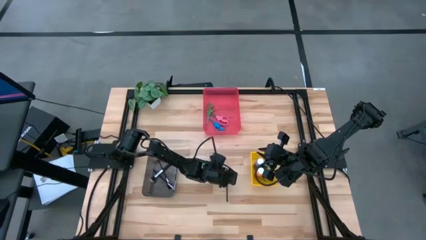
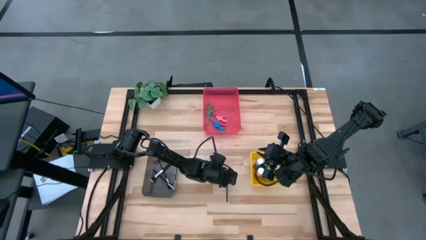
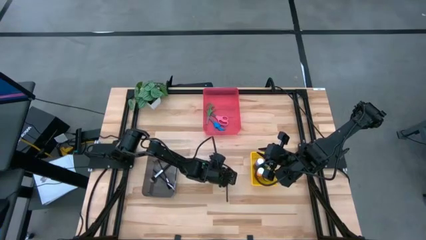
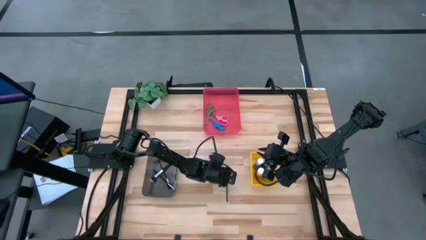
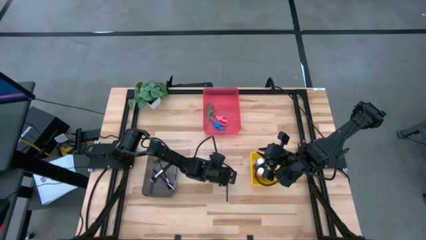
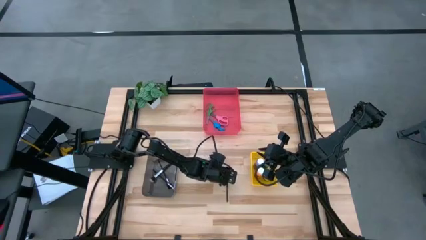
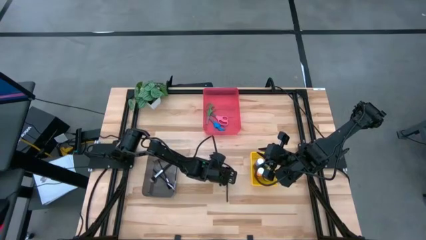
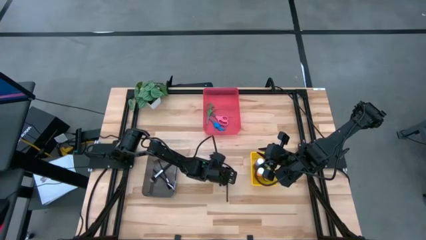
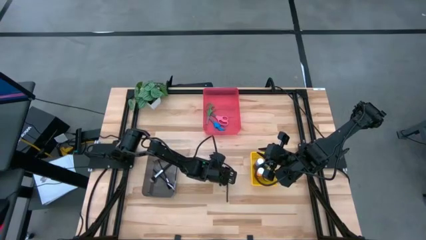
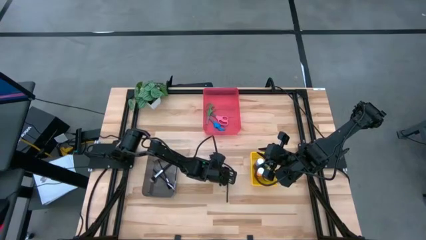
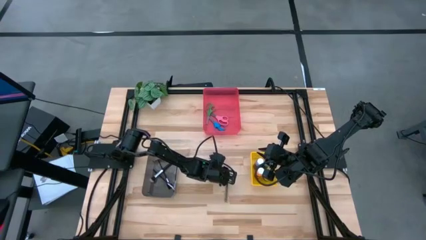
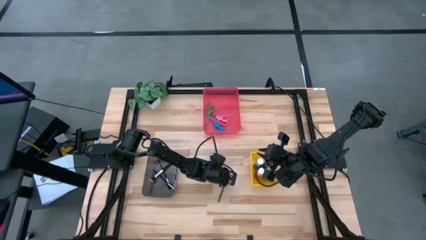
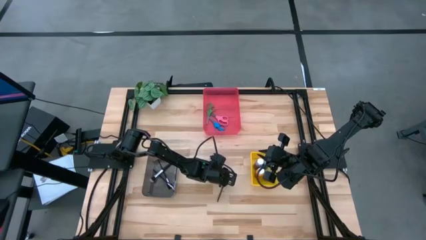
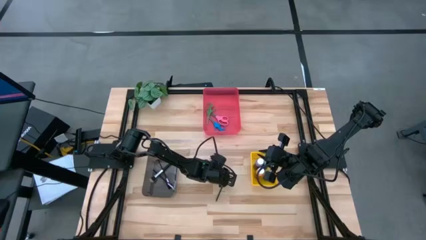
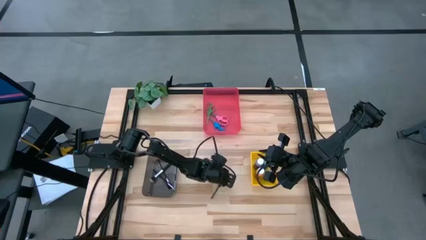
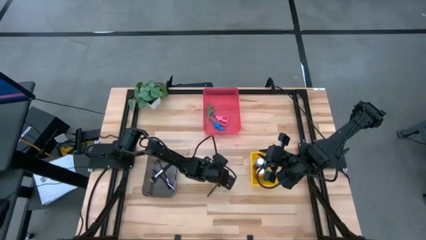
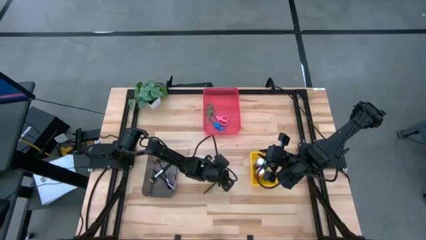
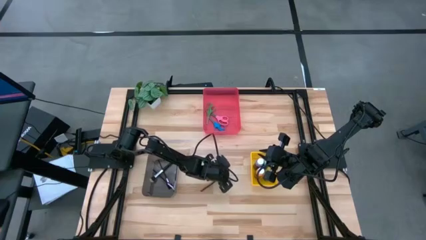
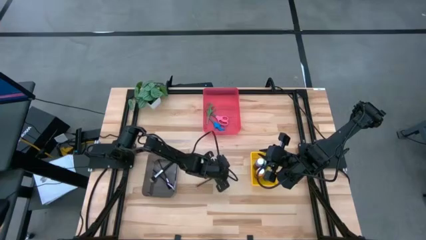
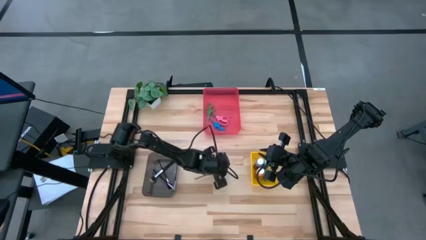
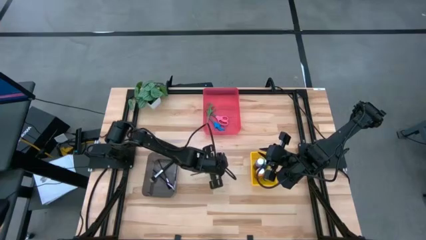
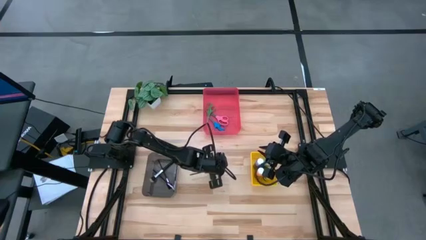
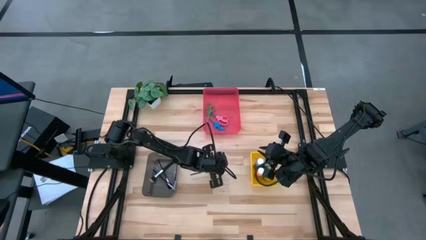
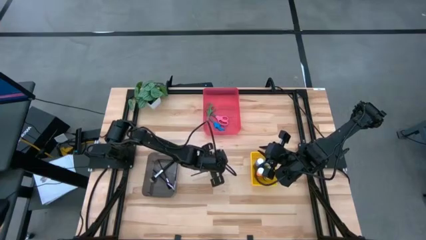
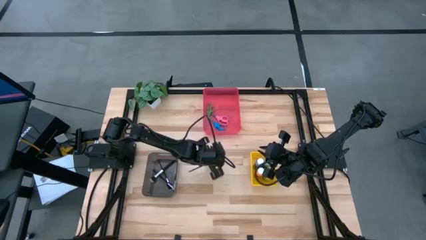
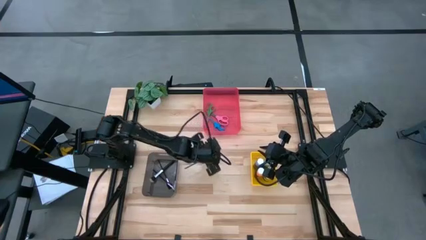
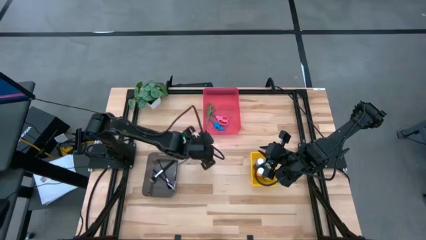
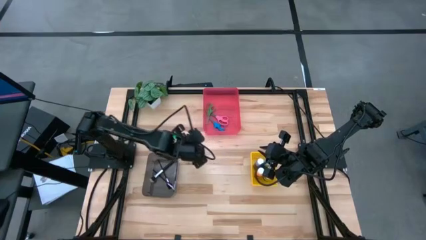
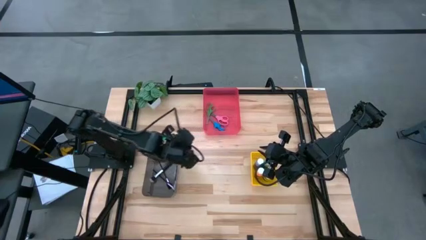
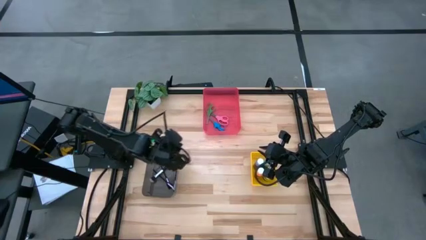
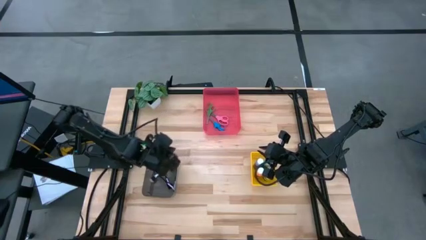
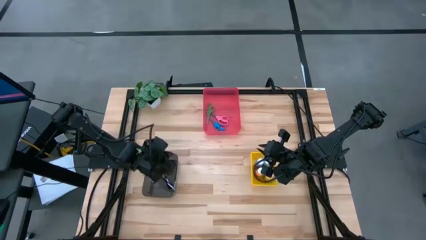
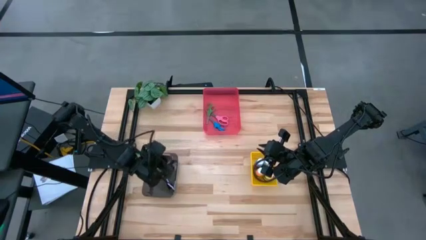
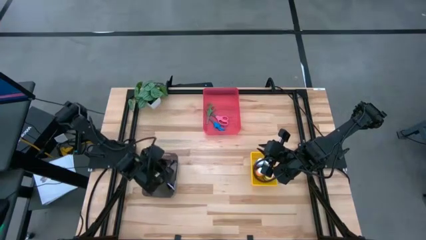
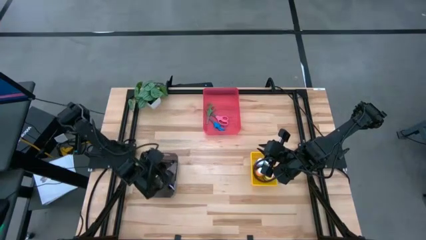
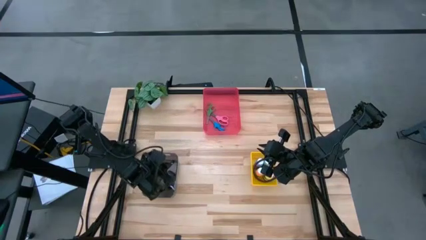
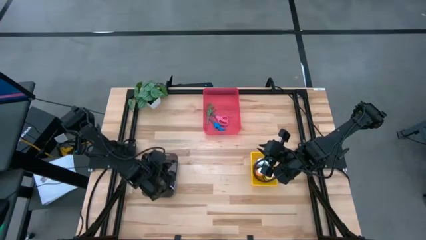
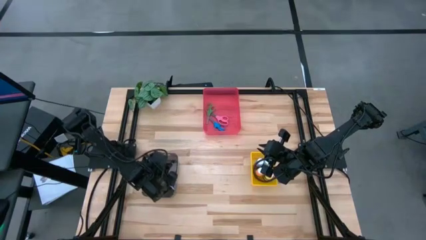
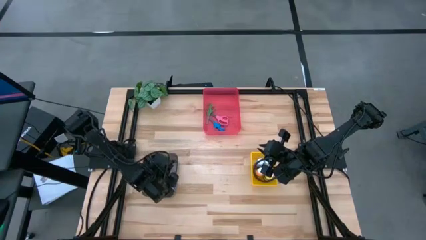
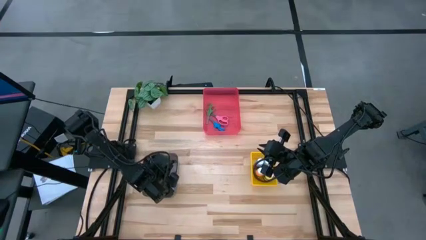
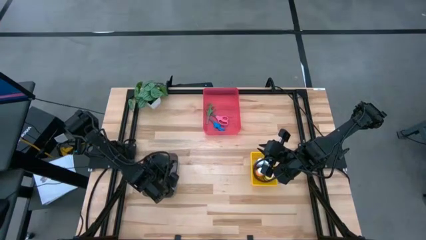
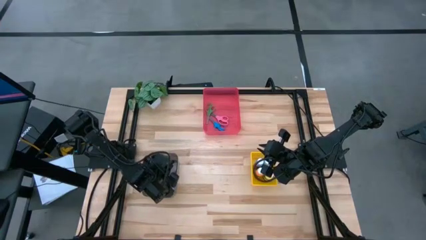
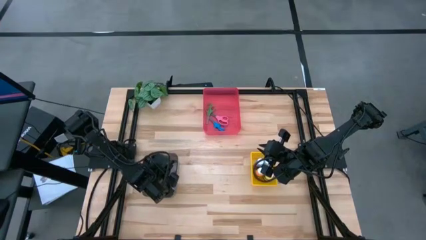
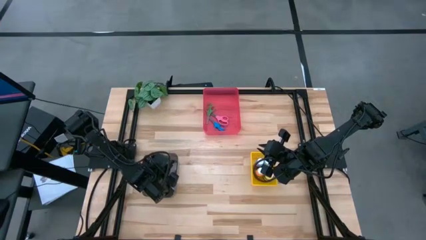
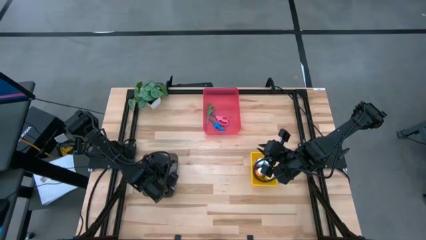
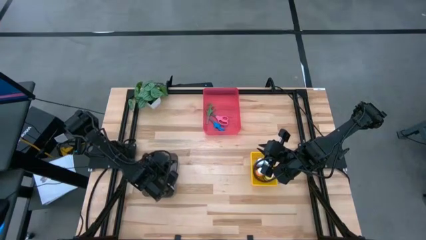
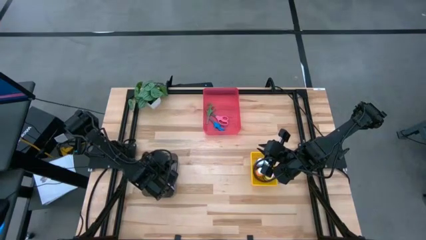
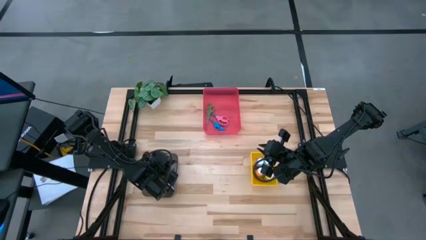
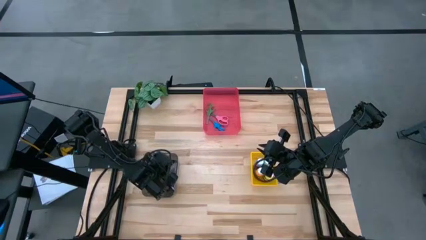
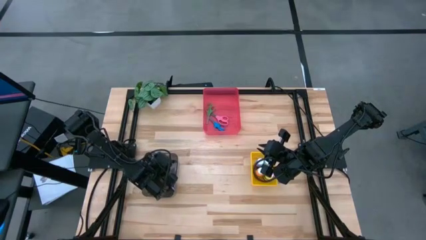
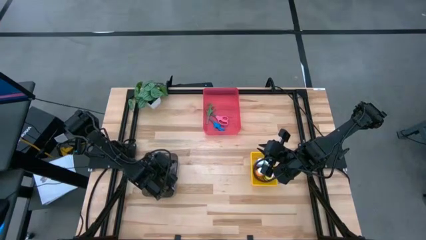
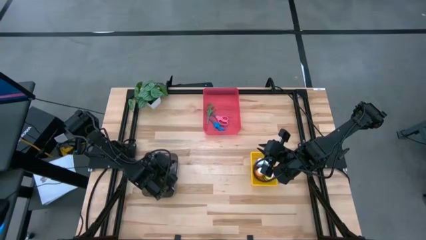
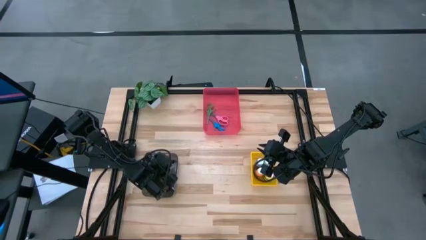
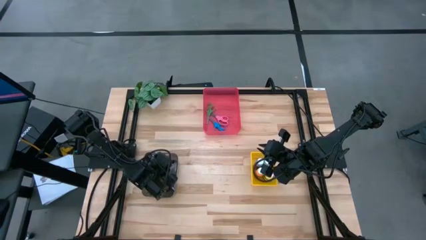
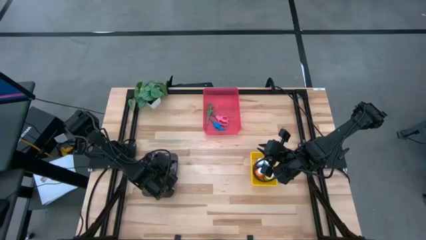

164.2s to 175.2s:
Task: Pick & Place Paint Supplies
Put the black makeup brush into the black bin

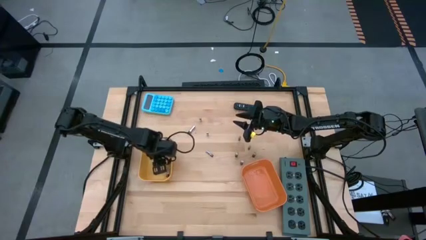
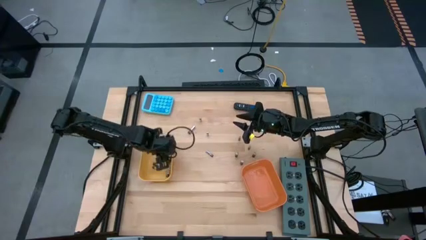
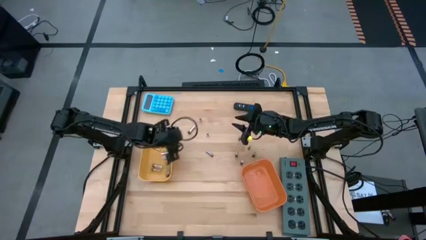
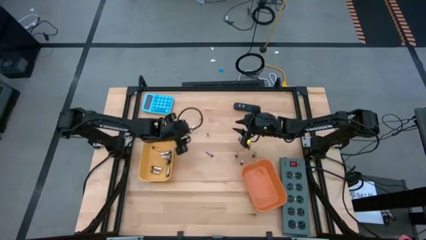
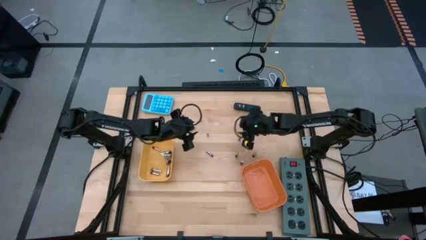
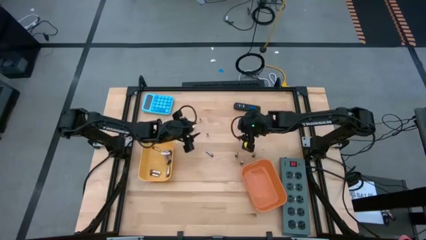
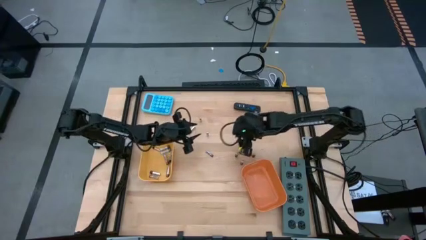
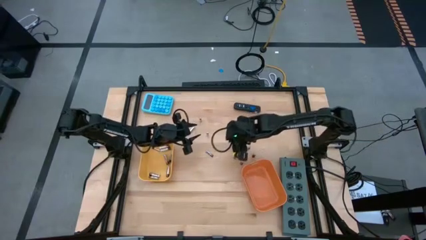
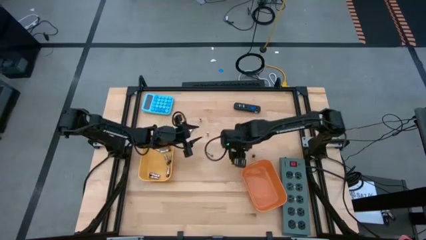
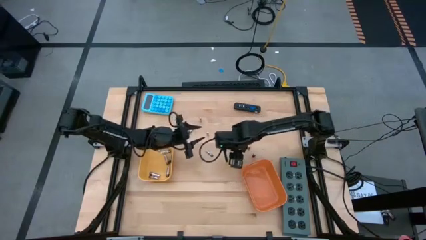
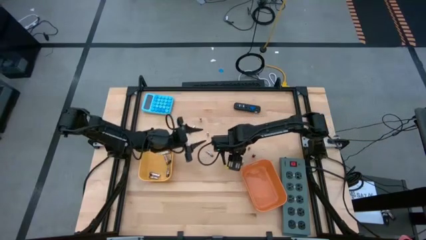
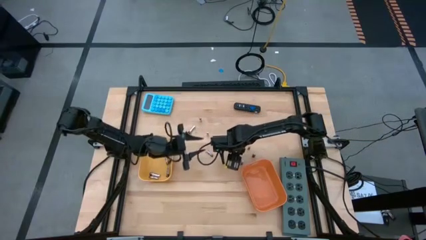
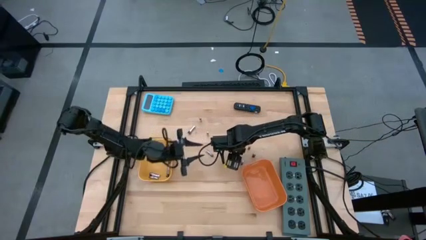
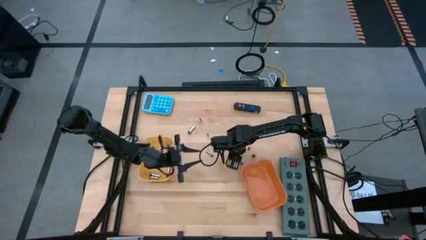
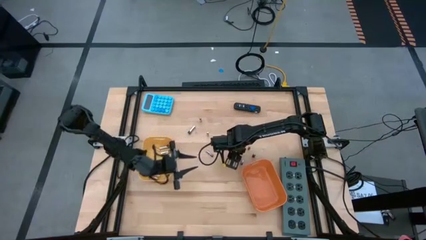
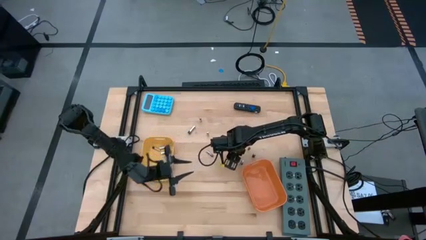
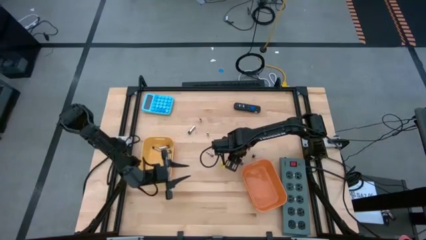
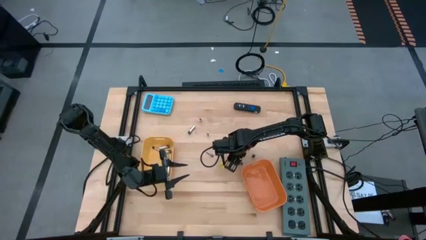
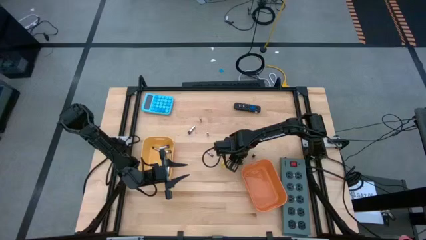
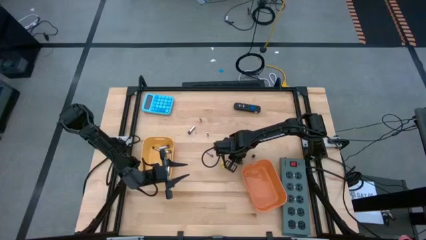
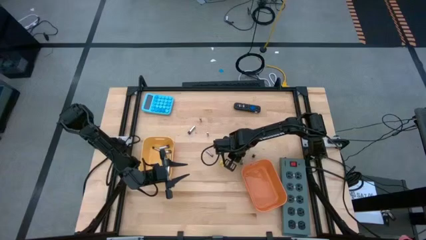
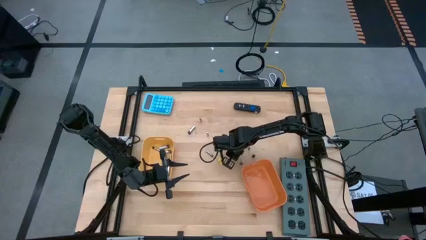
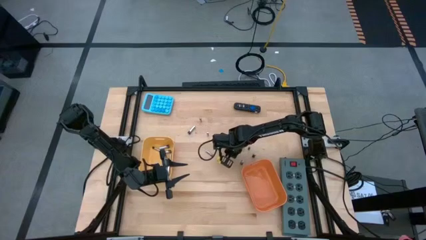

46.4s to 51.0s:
Task: Sort batteries
Put the black battery into the orange bin

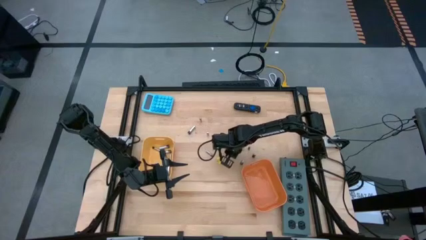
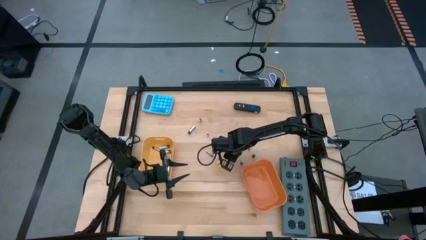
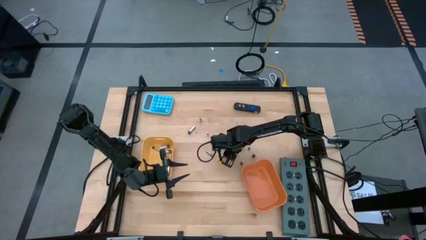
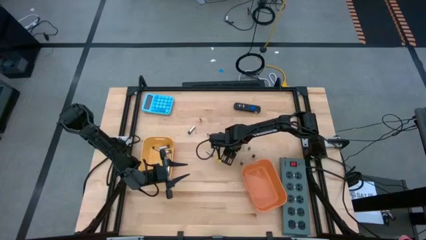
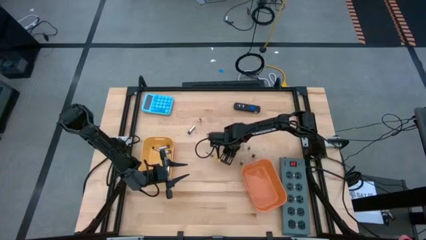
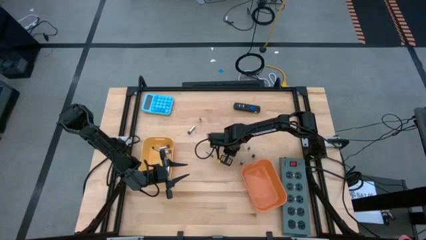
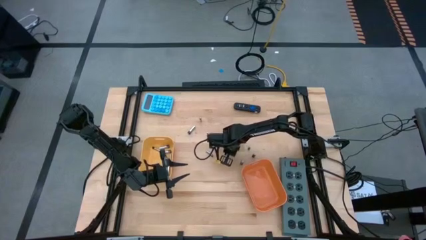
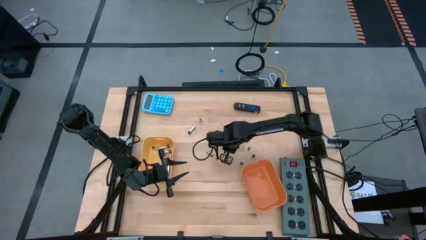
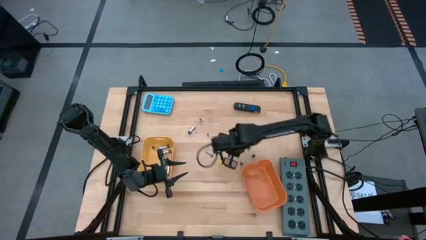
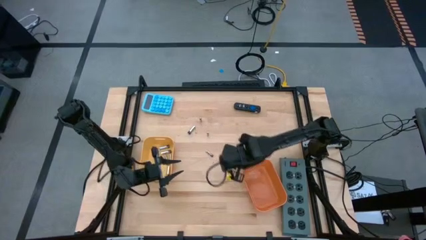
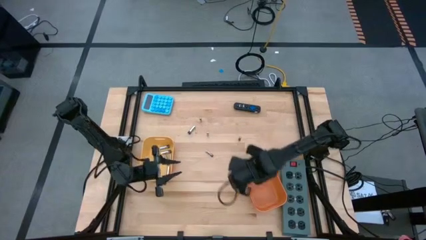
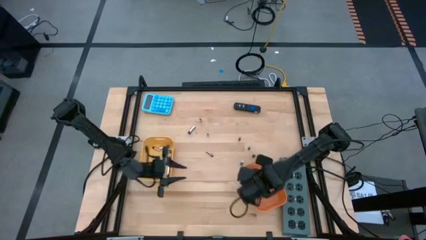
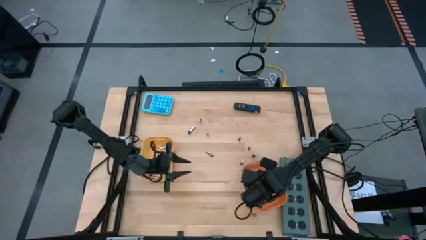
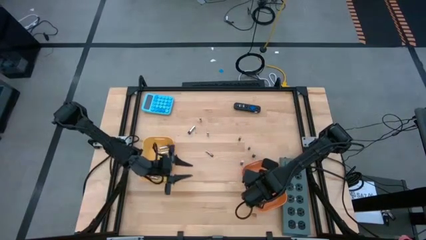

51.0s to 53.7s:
Put the black battery into the orange bin
